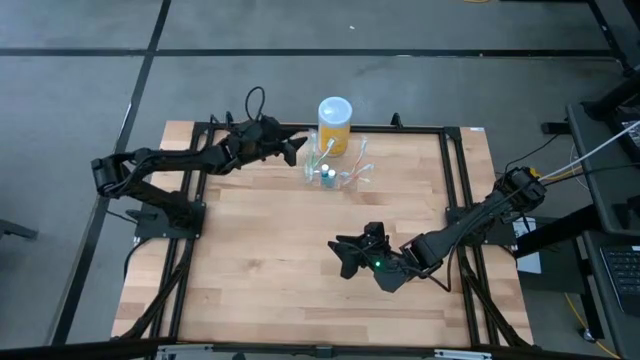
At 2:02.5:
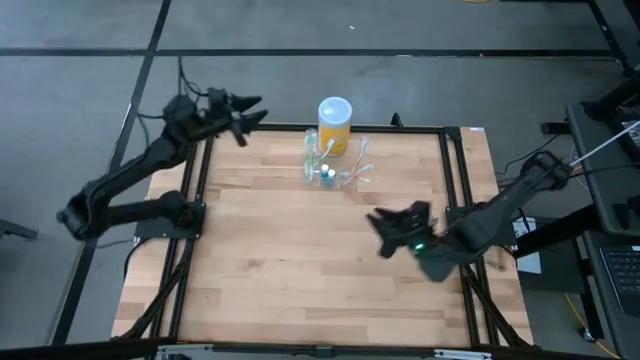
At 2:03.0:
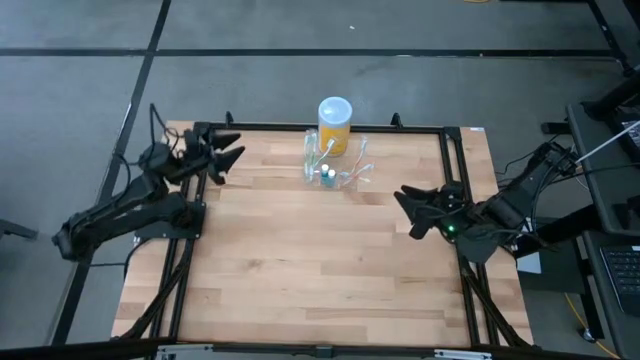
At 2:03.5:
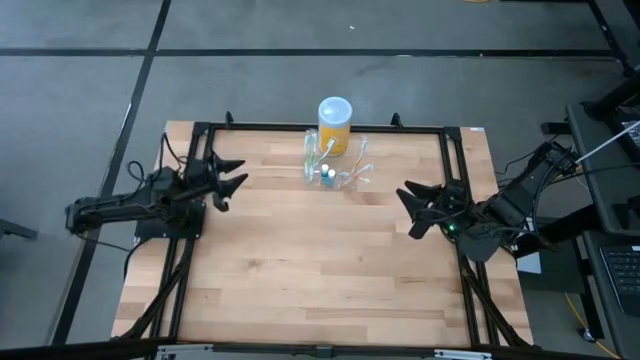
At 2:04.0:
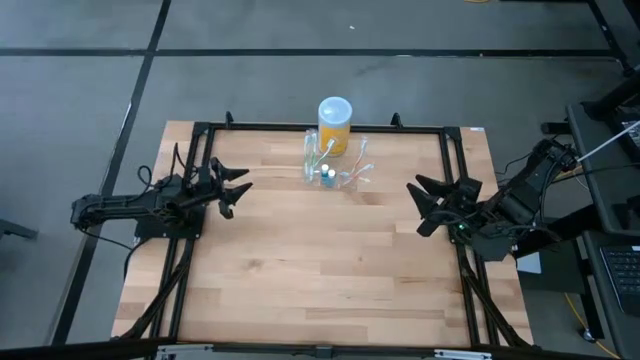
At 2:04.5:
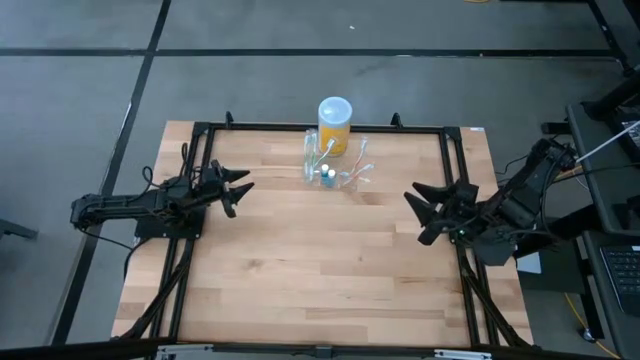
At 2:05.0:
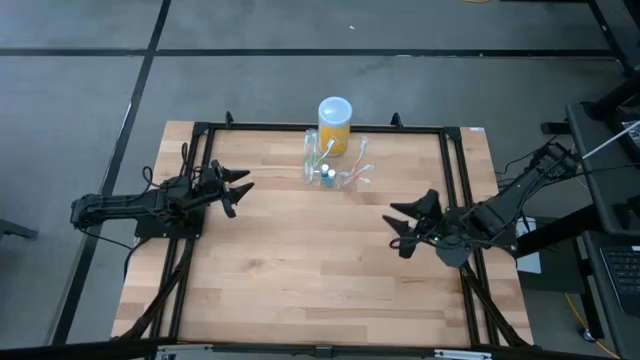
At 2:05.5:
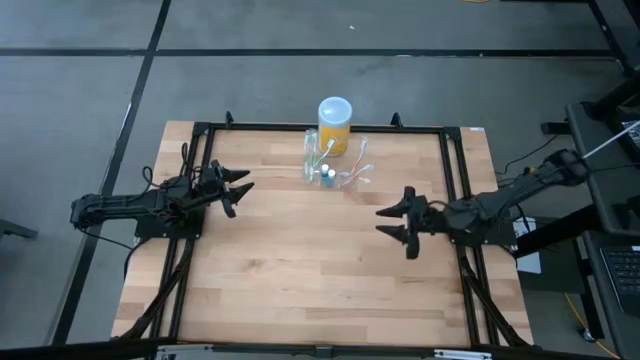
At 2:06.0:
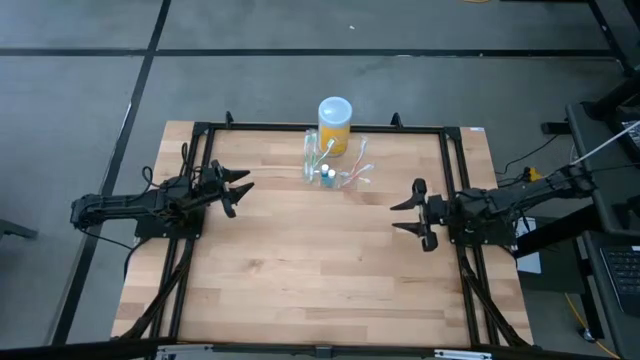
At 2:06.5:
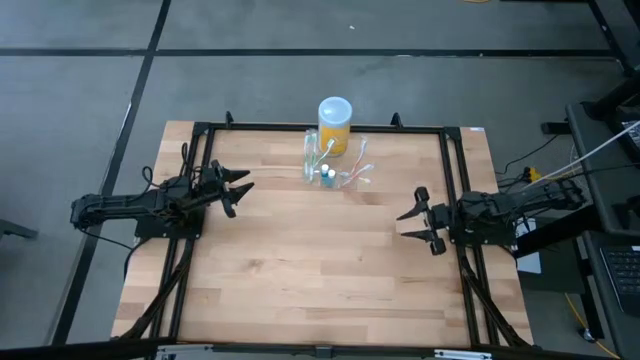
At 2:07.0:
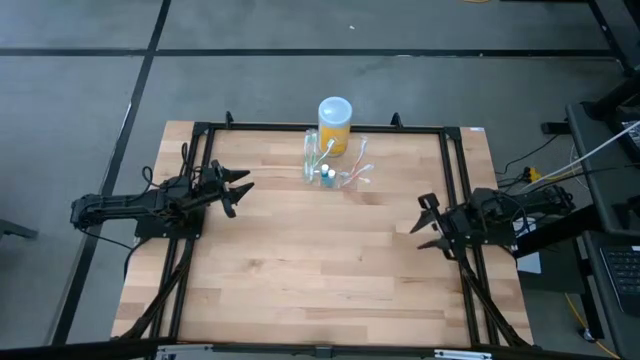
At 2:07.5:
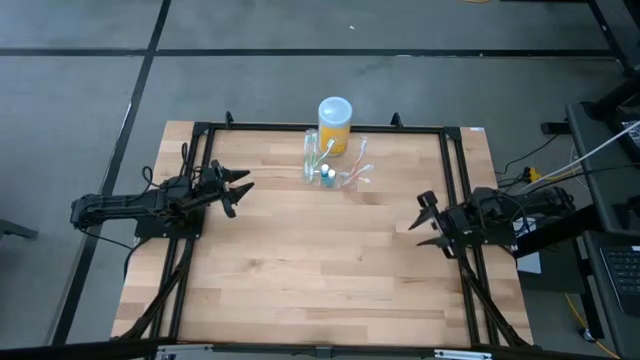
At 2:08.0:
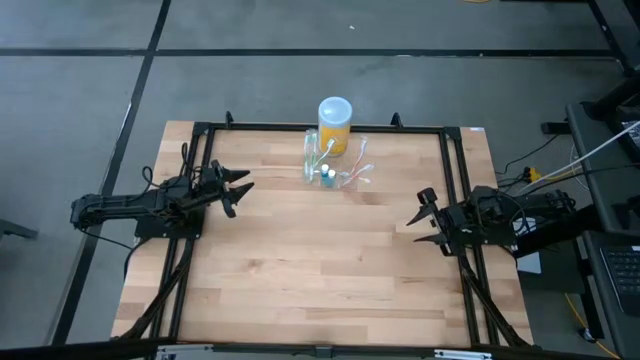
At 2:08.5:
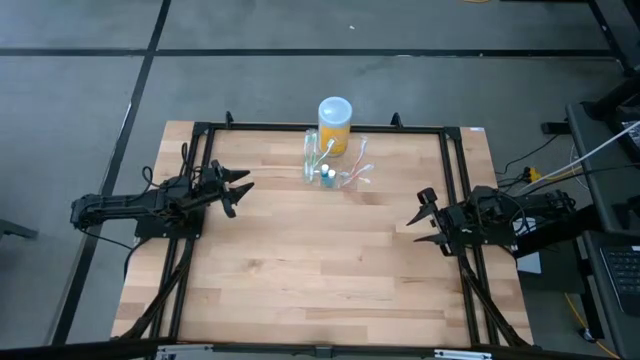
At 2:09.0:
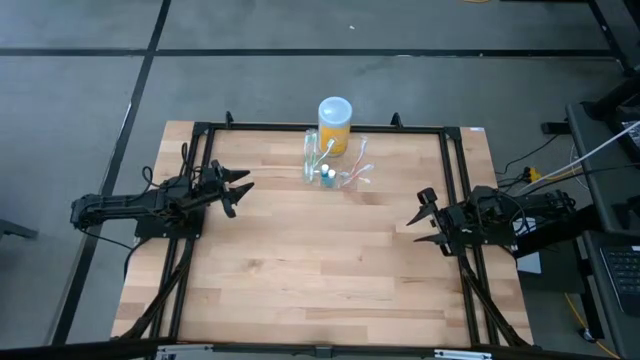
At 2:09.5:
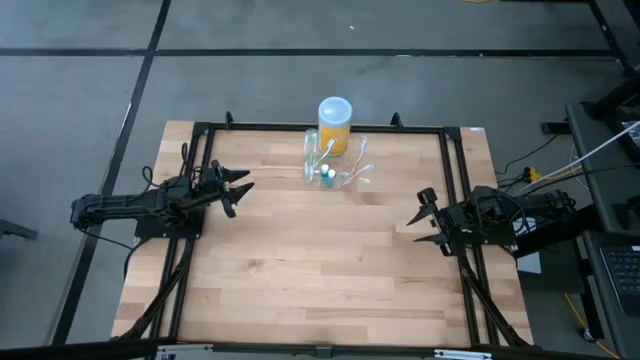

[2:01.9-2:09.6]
Task: Pick & Place toothbrushing station
Return to Home Position

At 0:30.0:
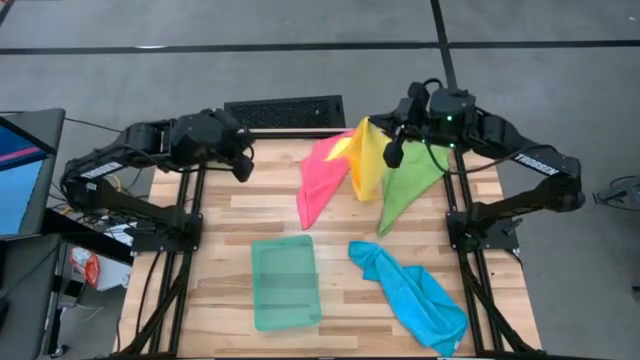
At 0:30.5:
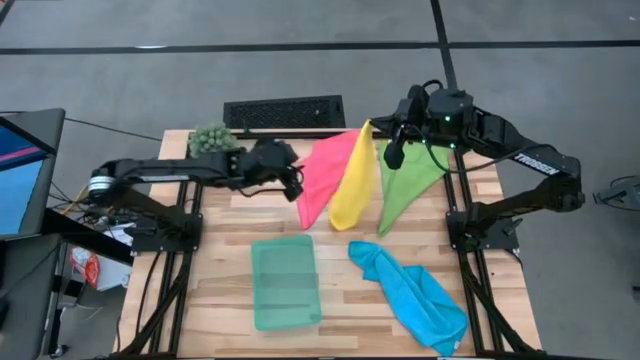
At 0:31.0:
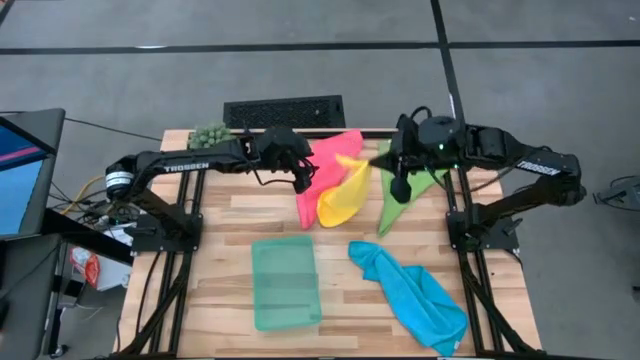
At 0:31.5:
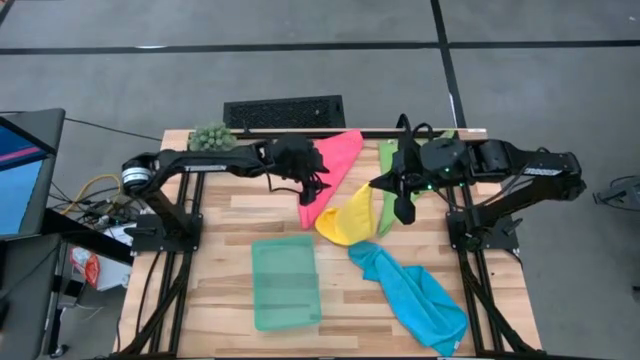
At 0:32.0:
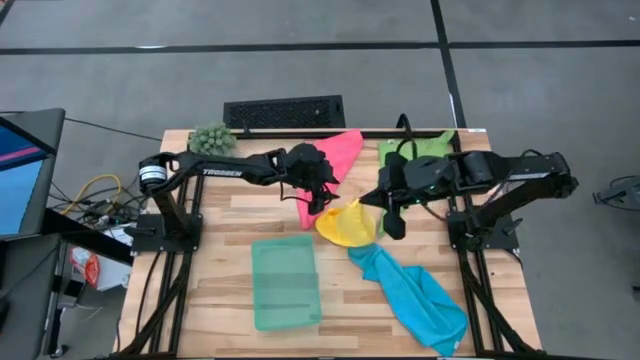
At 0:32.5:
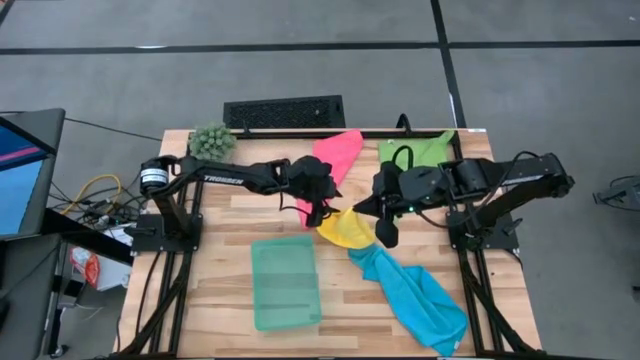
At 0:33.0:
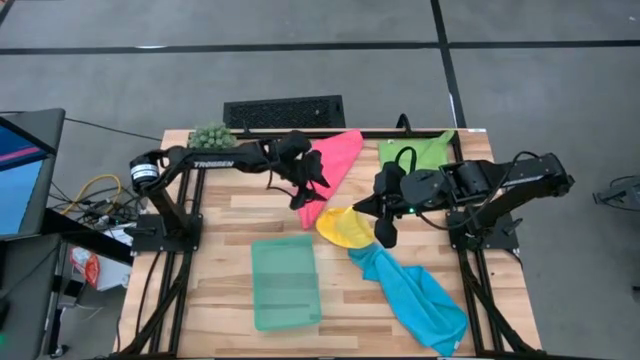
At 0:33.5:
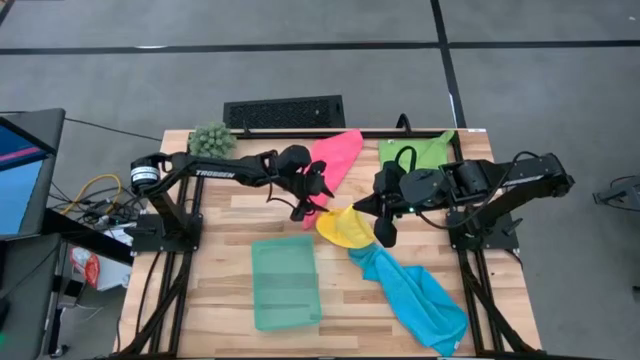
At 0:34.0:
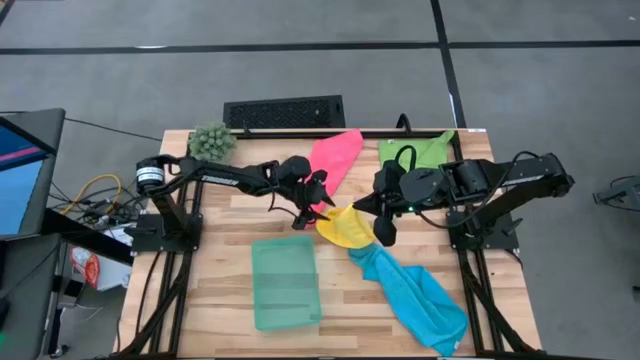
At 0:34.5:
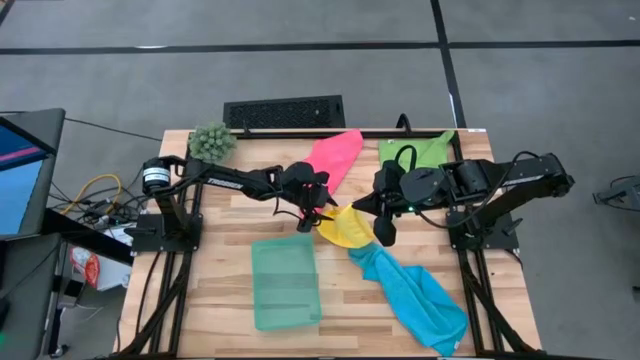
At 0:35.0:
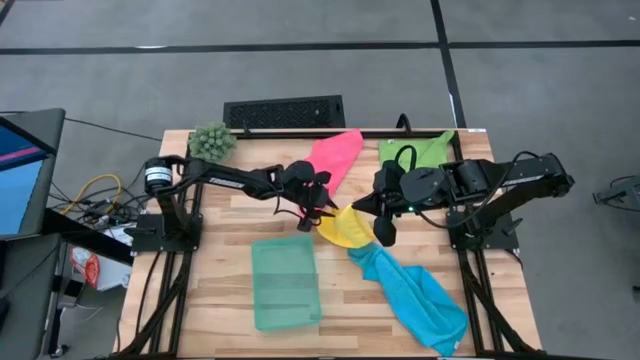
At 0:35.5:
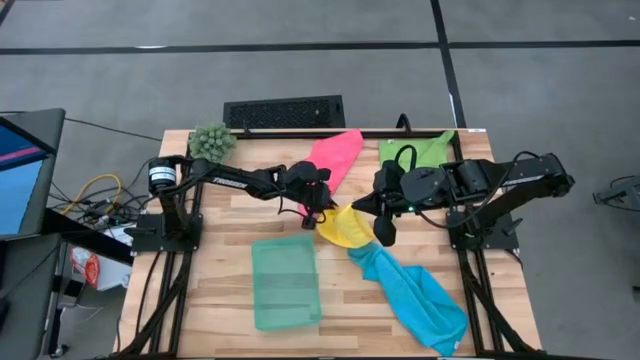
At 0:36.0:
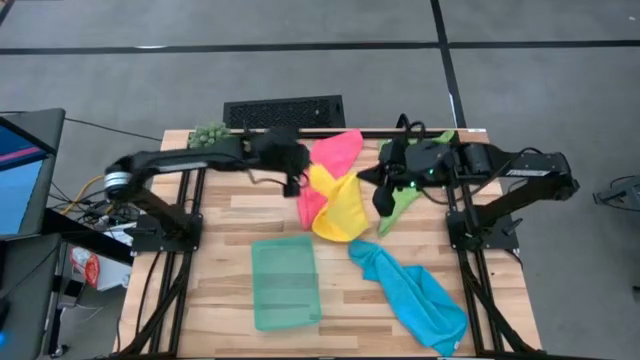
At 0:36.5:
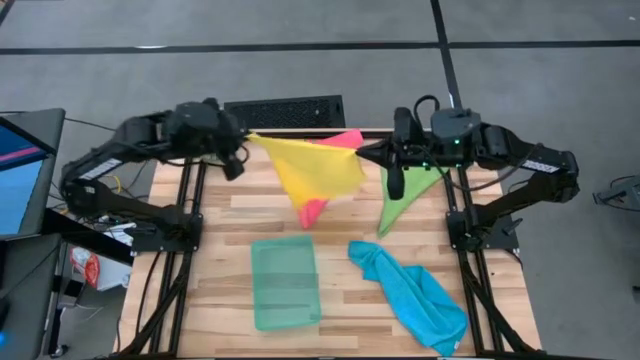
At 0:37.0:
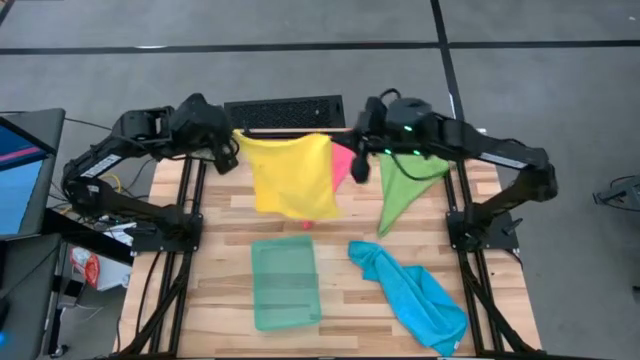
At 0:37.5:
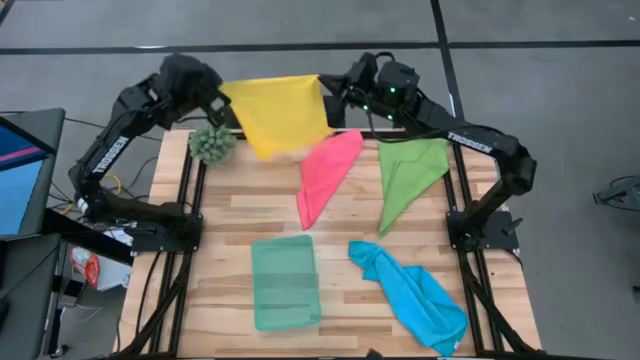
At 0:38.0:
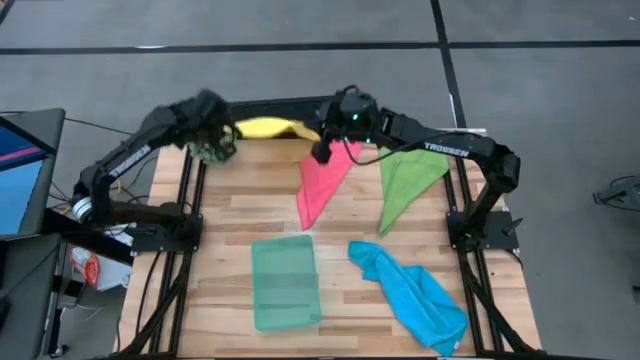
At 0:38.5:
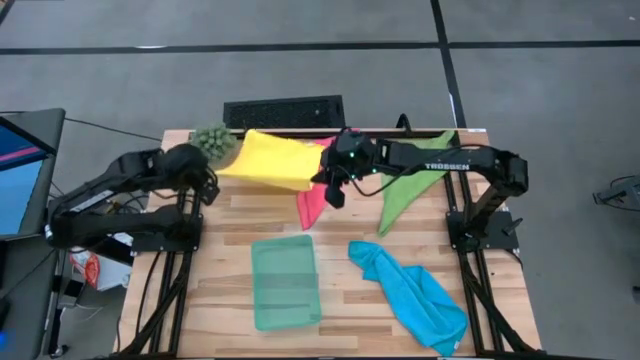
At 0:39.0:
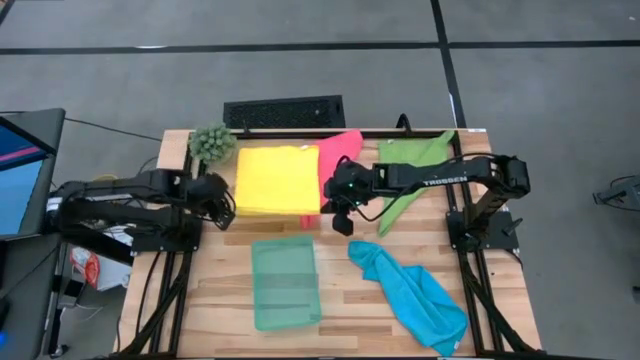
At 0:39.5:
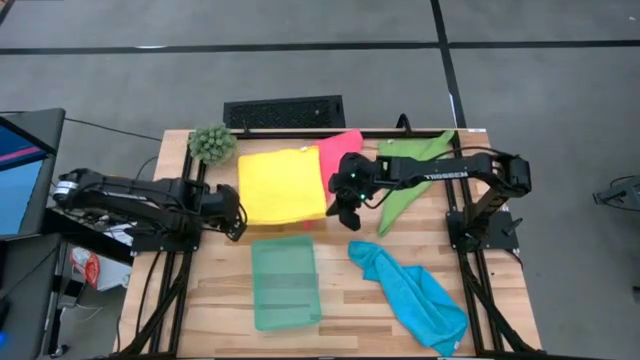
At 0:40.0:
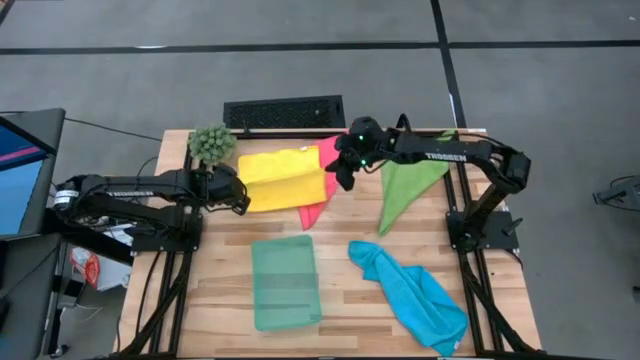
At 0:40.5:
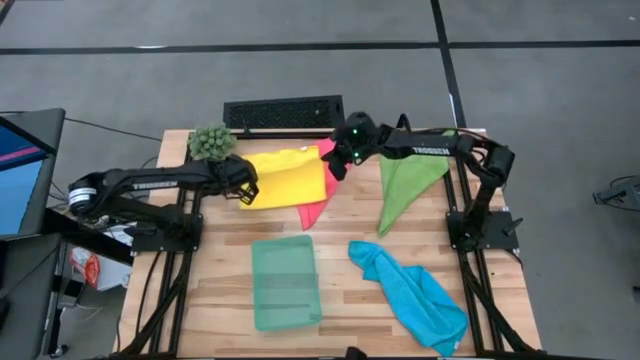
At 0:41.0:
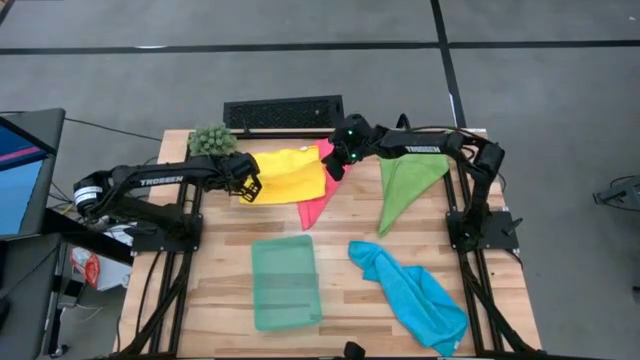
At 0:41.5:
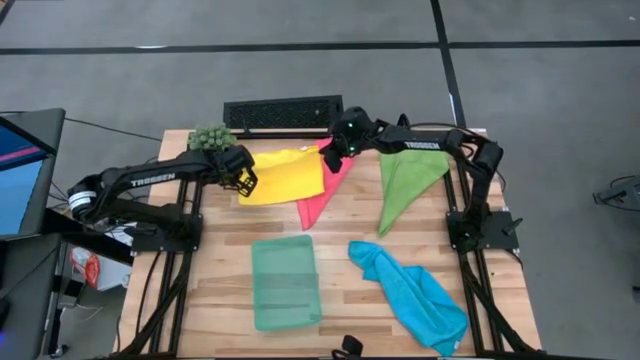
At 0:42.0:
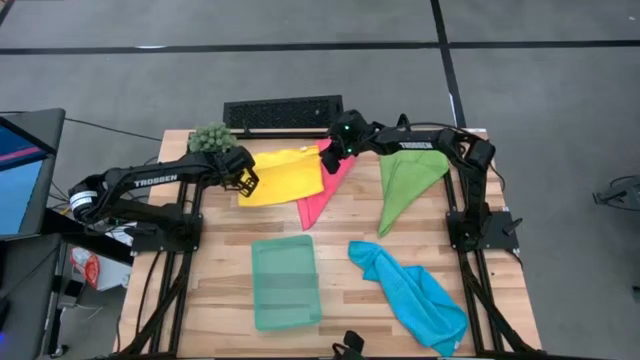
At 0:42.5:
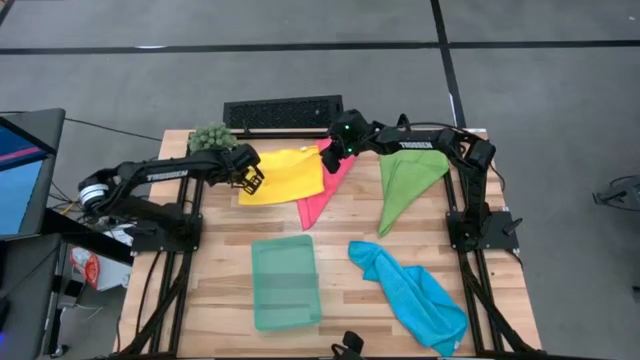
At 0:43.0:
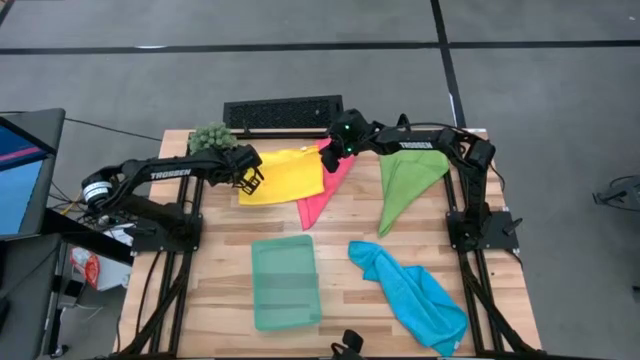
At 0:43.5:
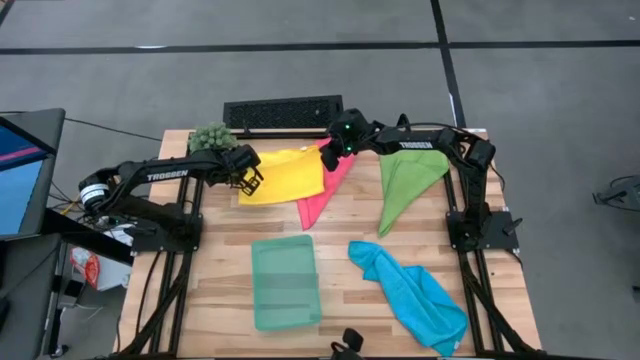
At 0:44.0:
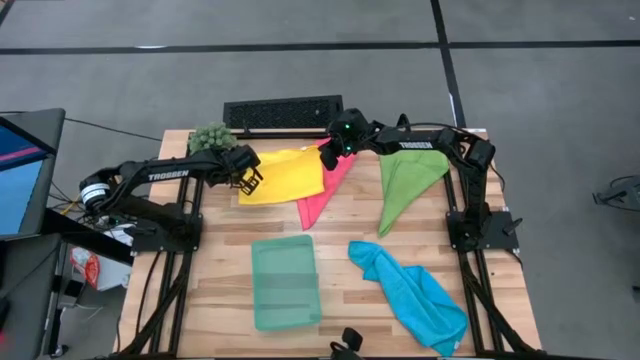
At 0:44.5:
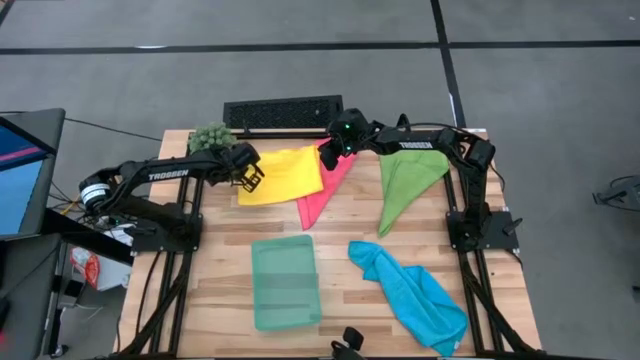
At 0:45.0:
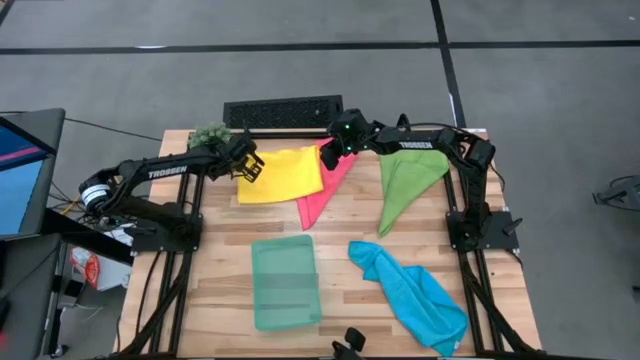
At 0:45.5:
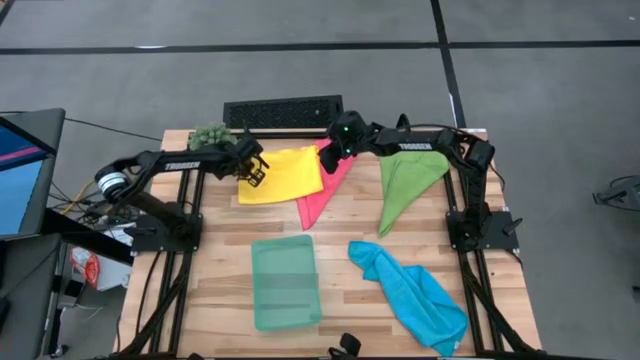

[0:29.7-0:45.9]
Task: Fold microfiber towels
Fold the yellow towel
